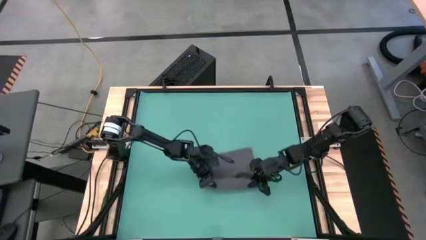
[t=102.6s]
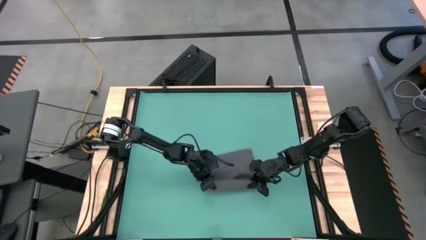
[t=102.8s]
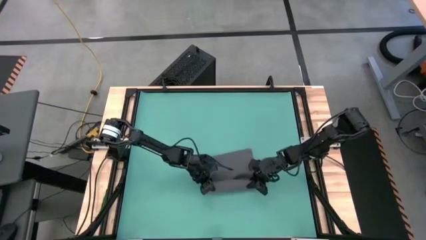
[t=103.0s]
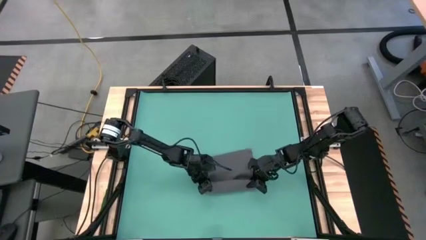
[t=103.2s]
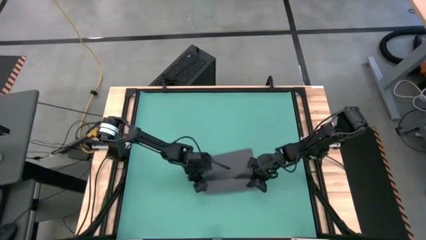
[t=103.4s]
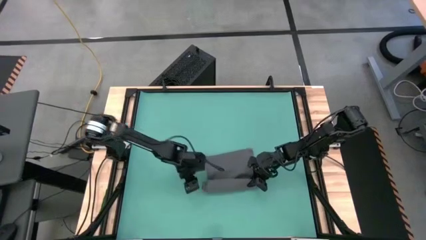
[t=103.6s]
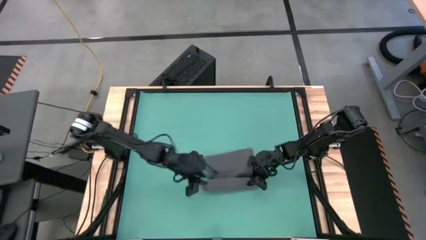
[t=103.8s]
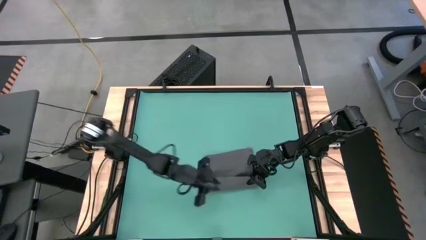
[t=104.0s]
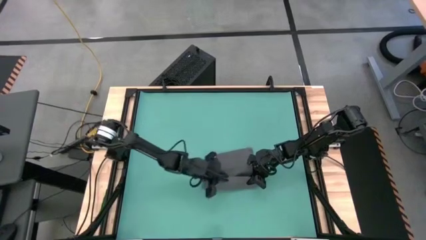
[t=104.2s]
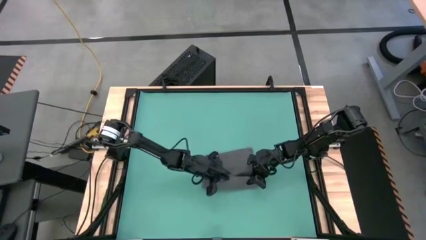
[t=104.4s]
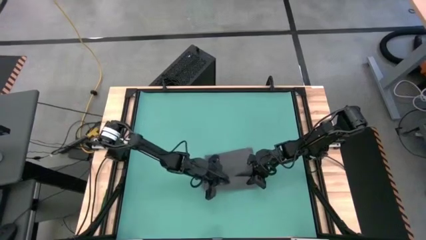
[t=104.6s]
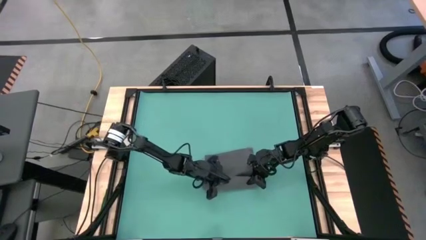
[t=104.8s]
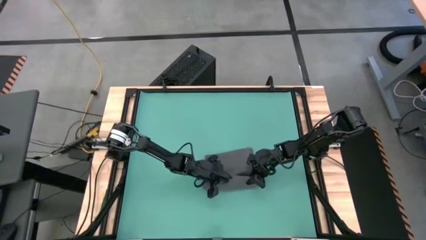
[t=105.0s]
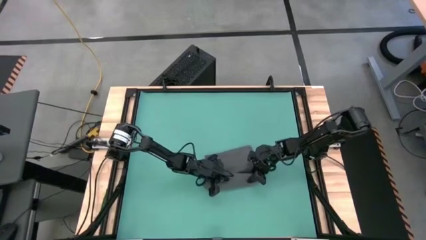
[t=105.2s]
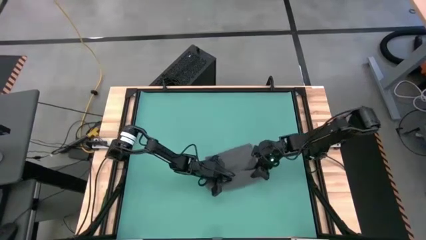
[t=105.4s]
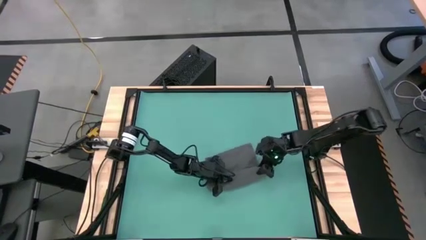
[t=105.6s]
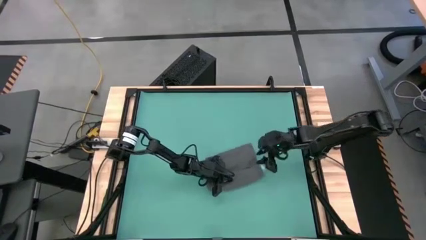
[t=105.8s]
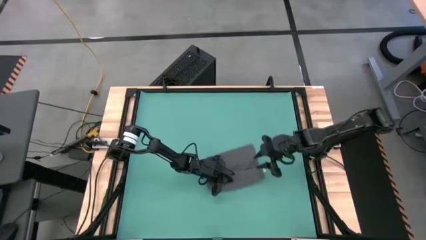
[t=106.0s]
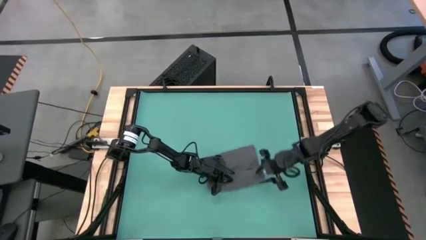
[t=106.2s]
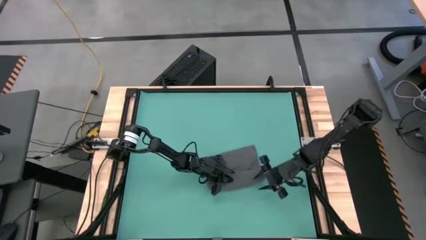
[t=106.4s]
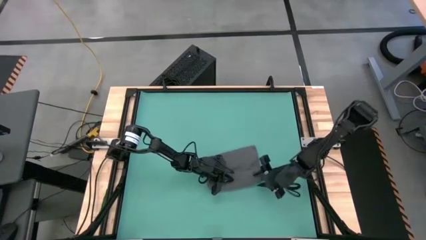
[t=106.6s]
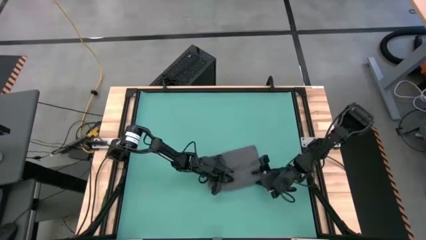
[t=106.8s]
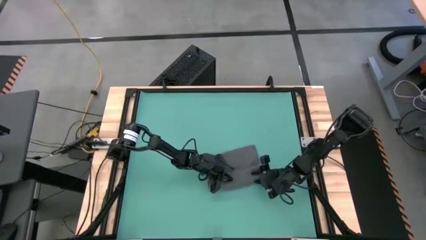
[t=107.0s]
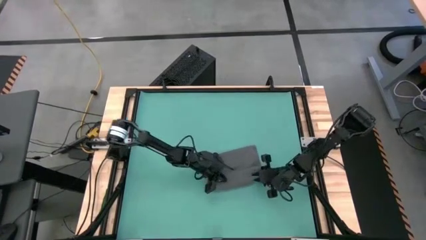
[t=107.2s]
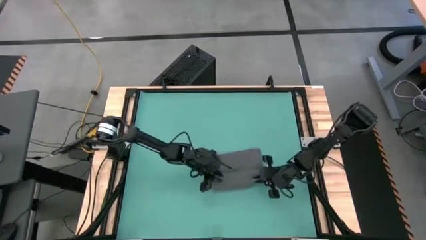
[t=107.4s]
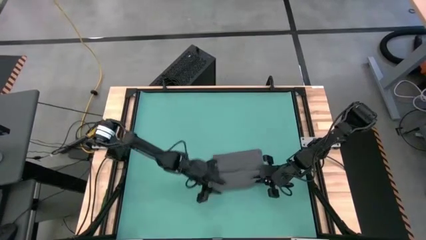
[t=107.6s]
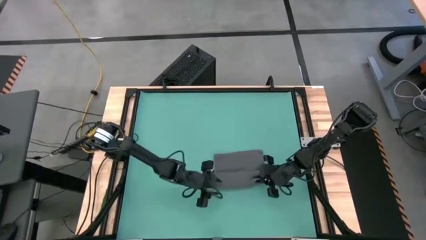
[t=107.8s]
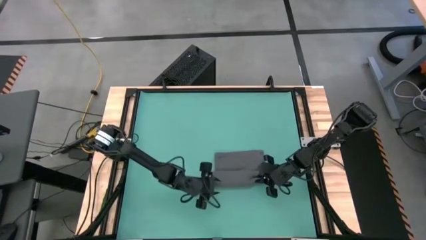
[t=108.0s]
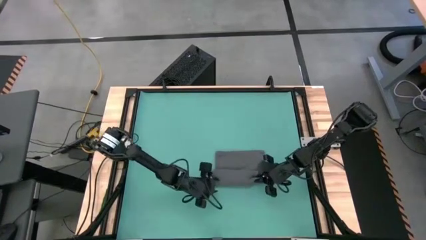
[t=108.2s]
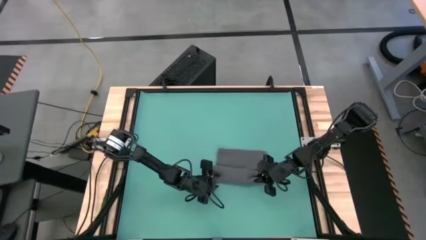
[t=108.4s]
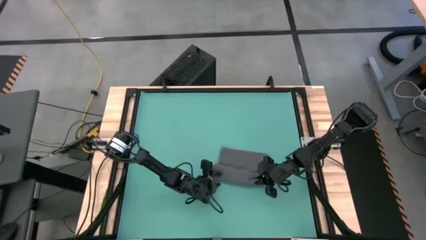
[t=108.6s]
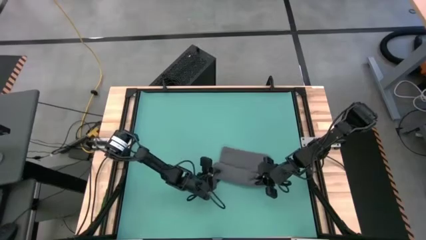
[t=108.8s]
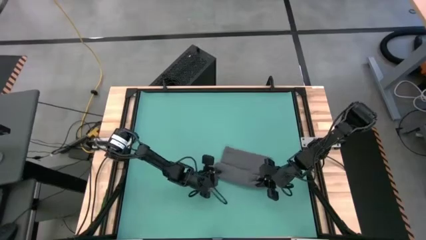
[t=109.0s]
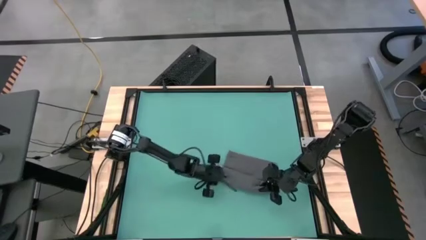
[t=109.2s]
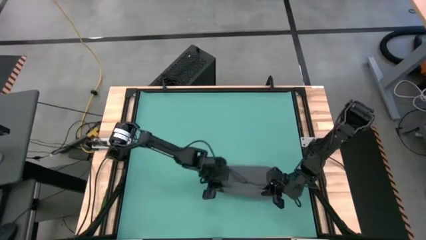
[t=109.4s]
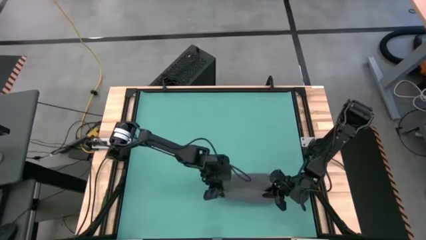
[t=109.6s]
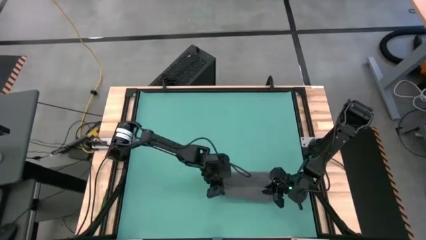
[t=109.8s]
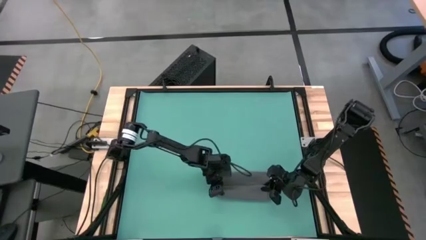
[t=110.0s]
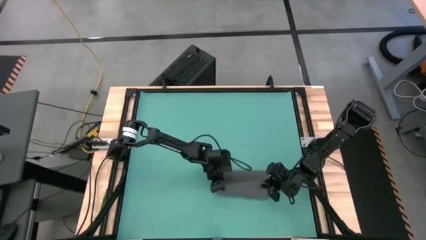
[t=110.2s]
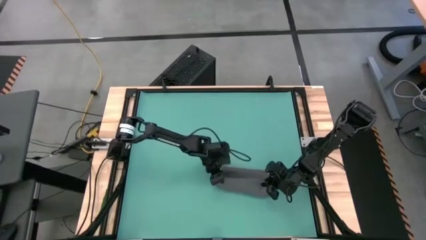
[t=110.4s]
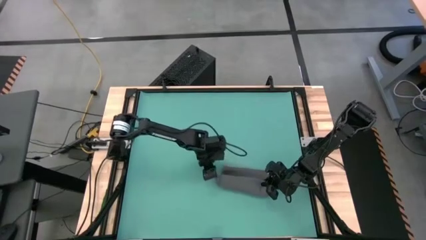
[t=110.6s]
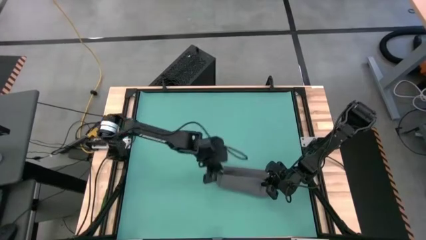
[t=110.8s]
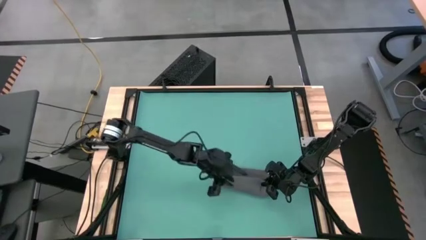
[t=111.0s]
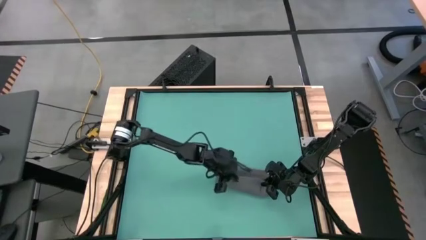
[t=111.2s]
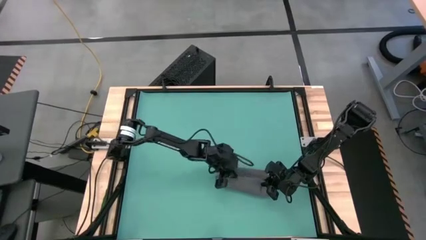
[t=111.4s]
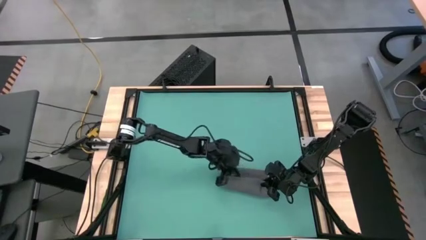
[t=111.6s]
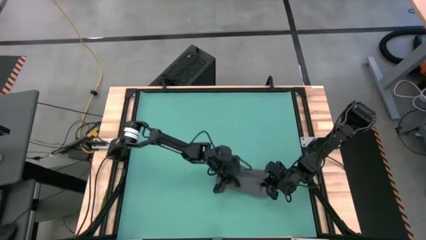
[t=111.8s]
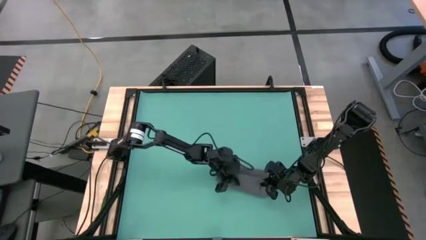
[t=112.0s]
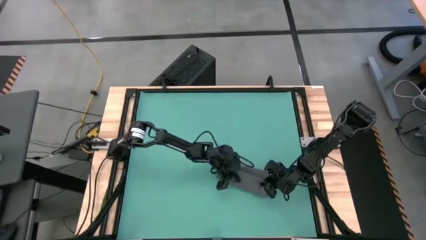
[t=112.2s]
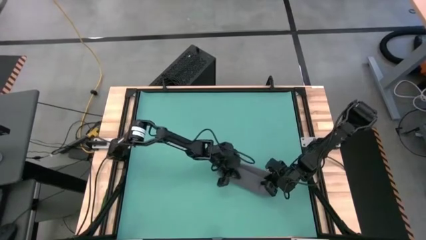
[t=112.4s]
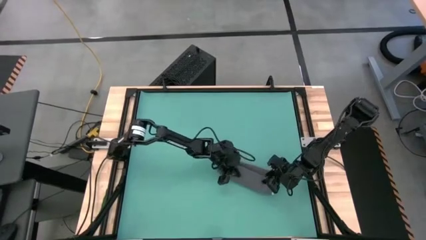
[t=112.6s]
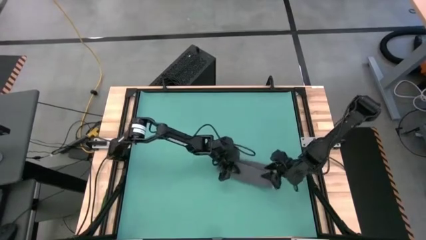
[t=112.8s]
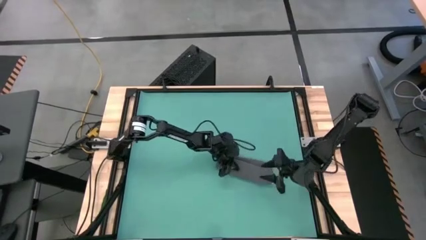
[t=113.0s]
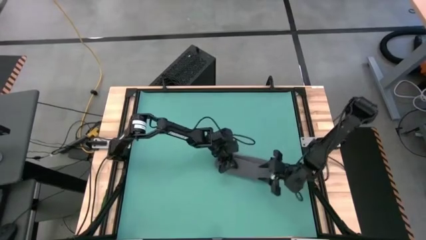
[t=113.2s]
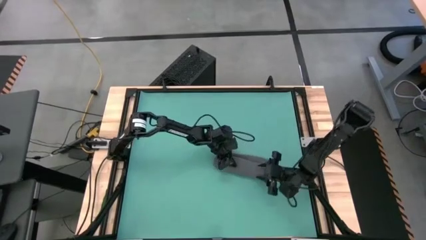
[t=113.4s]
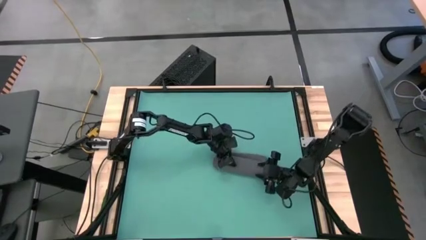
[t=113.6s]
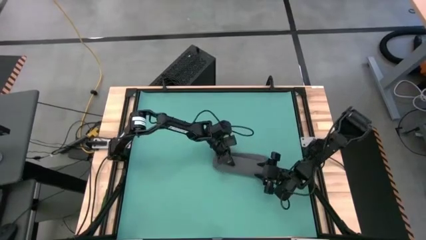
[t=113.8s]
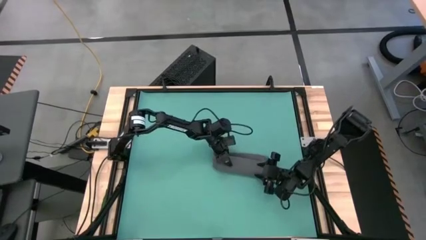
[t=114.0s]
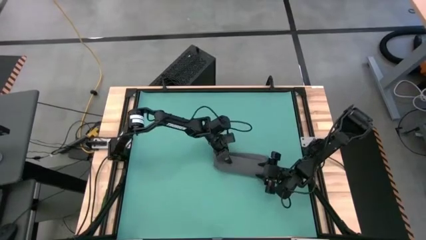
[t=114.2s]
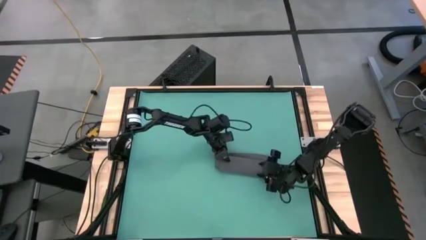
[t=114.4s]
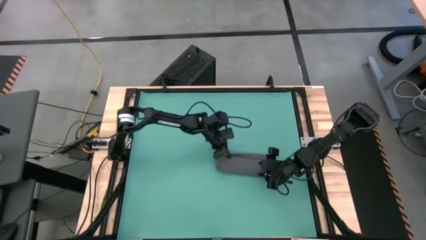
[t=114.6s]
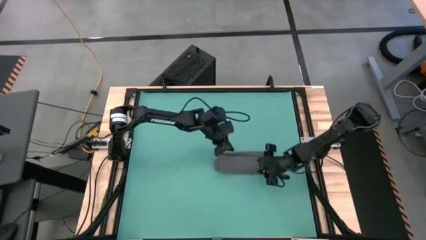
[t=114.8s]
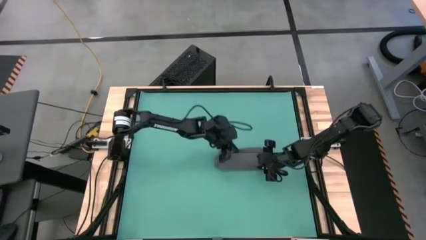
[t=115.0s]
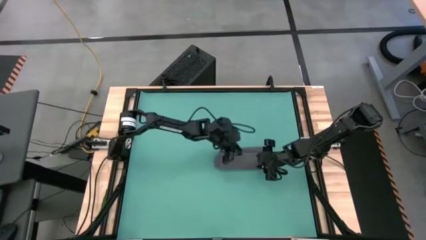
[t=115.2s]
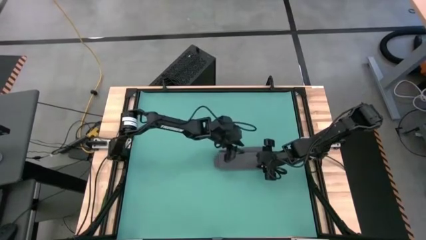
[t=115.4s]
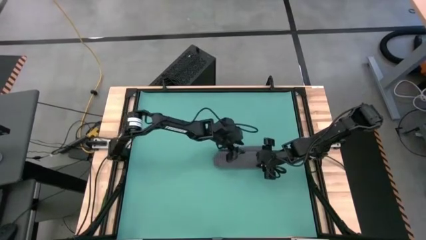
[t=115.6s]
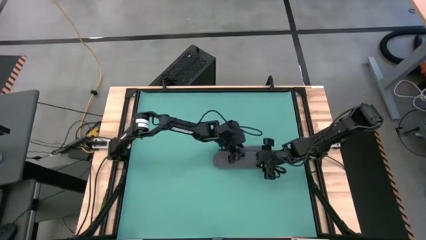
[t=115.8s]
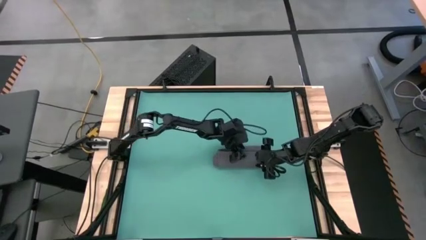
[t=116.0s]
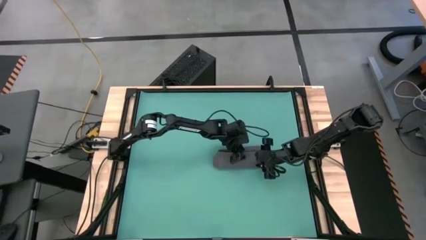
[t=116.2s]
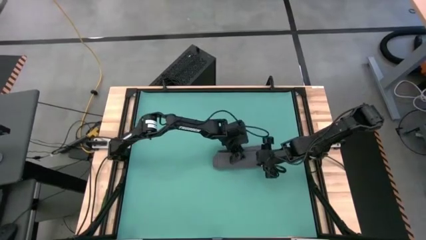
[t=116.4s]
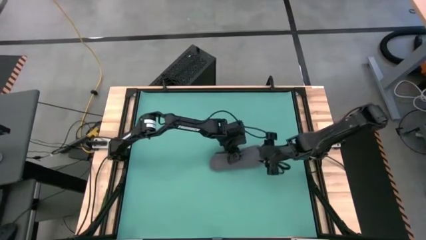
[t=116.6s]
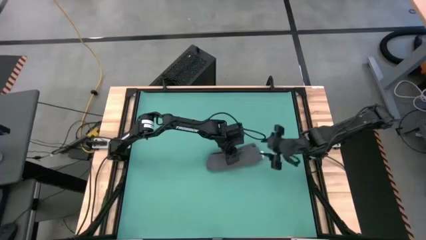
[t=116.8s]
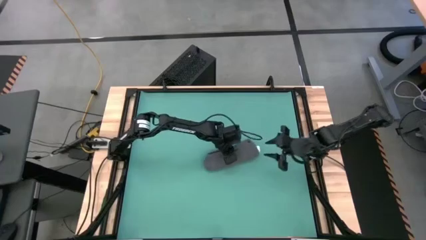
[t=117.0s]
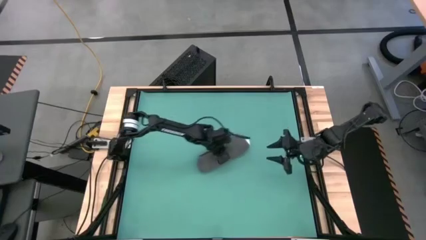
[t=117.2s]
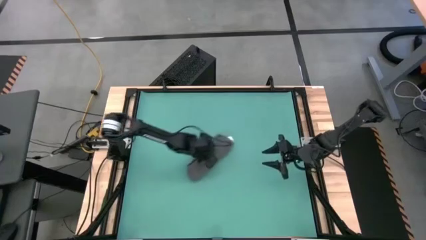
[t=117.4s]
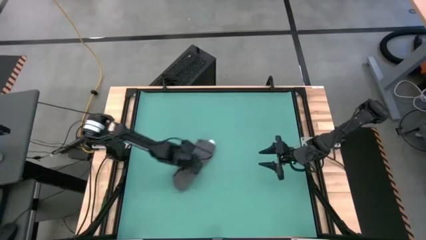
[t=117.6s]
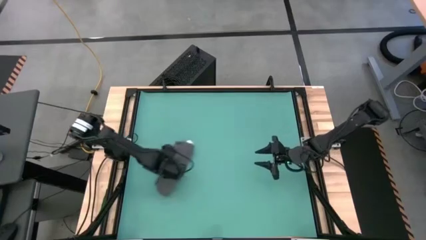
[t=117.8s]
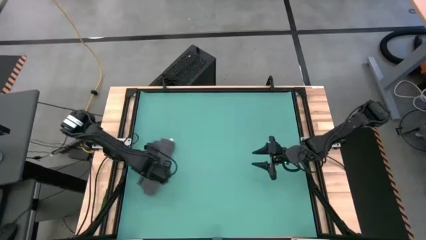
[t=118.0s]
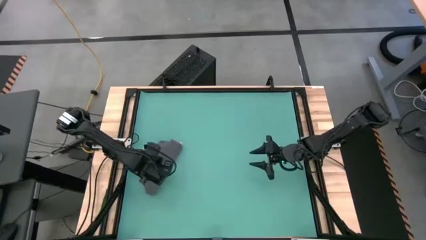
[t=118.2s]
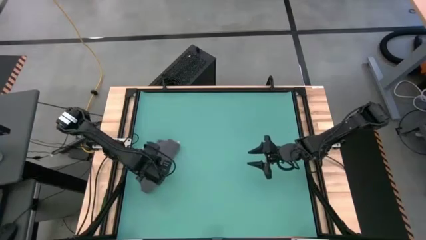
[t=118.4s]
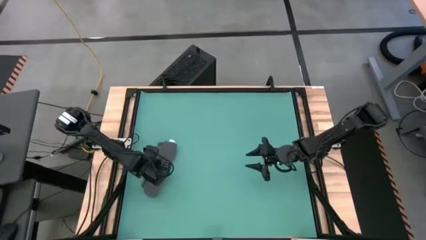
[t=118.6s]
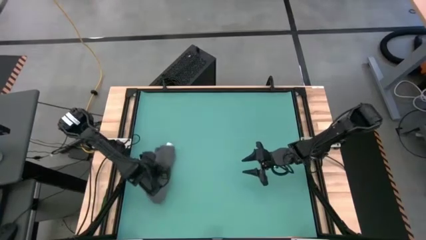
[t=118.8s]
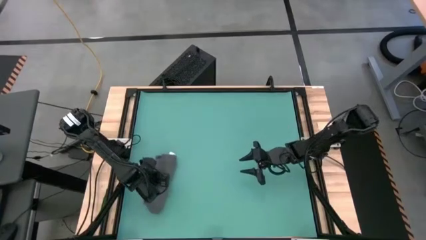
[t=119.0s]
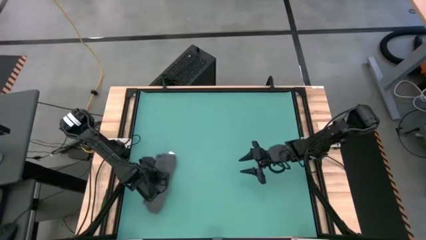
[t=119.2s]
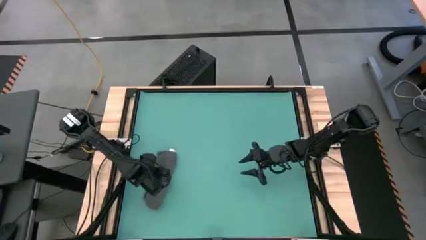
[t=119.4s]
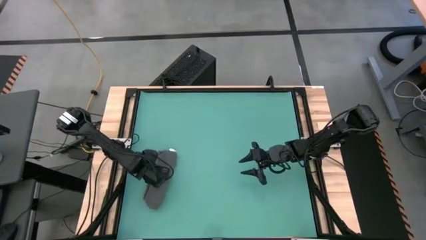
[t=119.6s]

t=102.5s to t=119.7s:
Task: Roll towel into tight, uniform cylinder
Roll the gray towel
